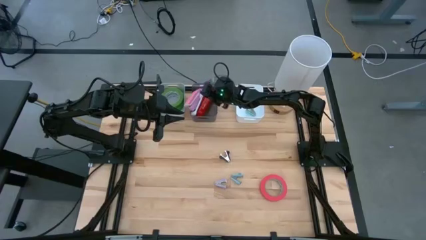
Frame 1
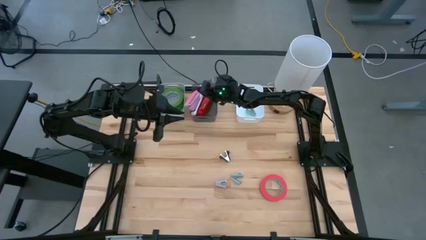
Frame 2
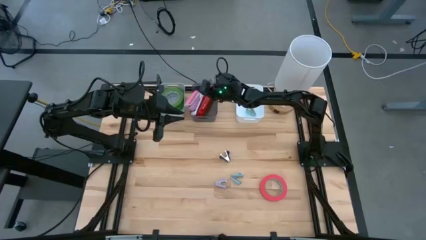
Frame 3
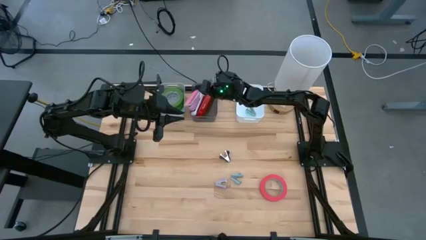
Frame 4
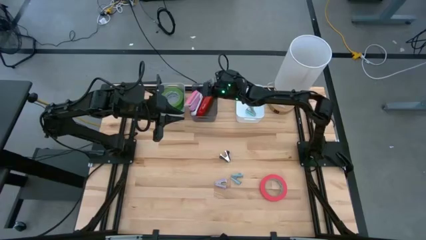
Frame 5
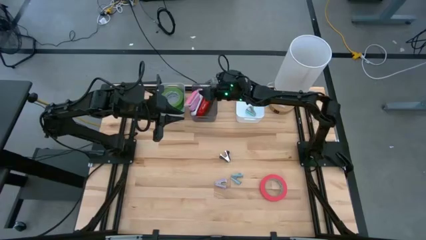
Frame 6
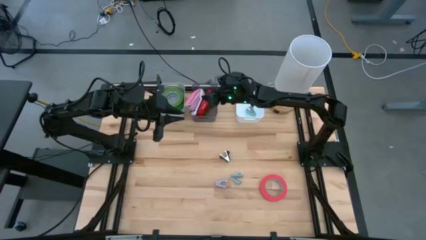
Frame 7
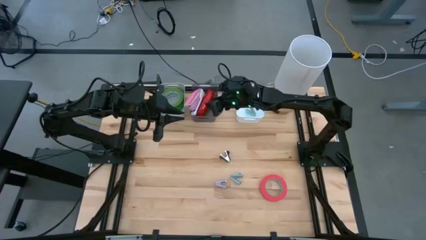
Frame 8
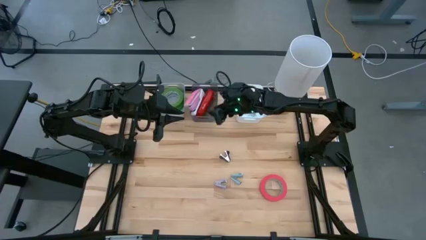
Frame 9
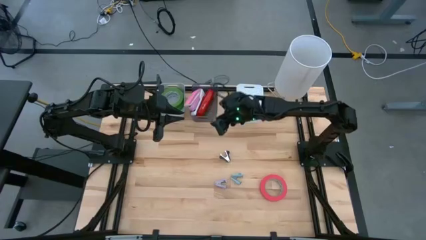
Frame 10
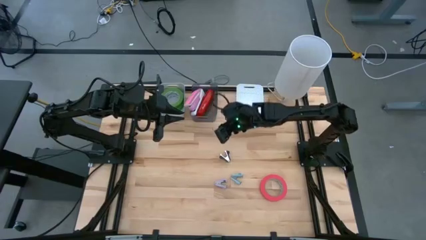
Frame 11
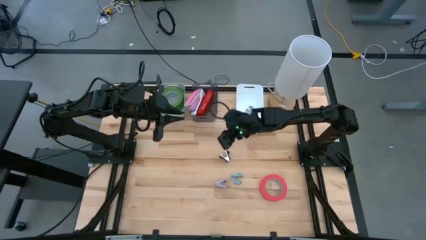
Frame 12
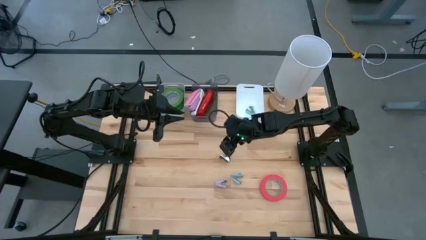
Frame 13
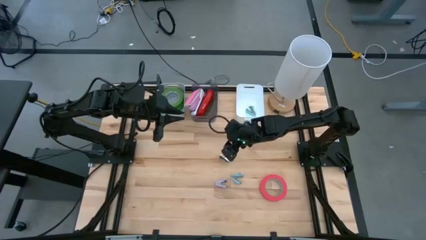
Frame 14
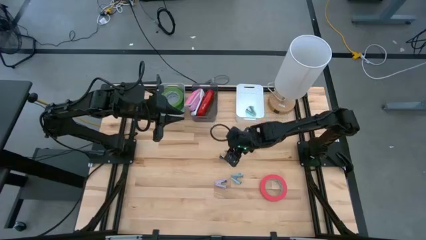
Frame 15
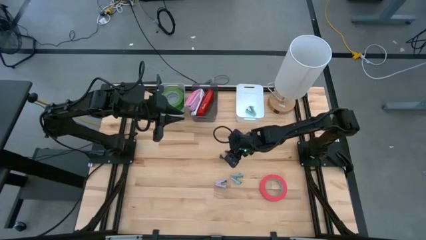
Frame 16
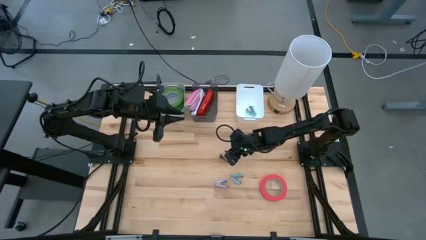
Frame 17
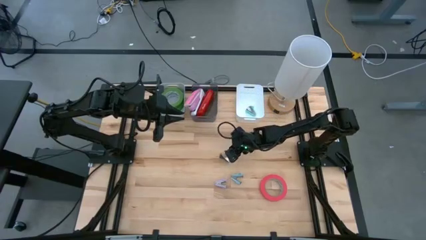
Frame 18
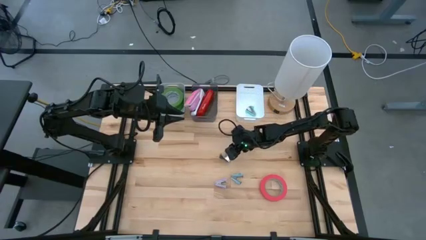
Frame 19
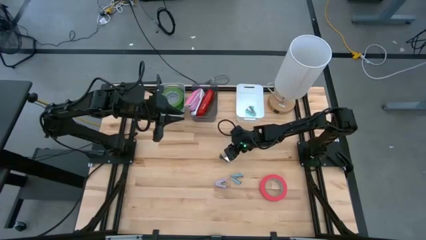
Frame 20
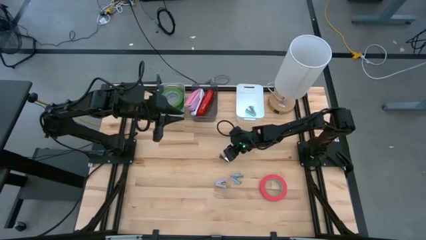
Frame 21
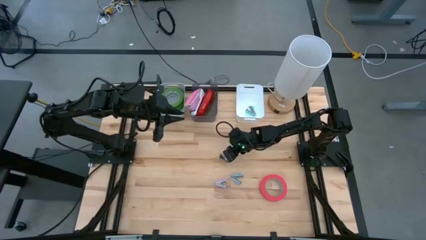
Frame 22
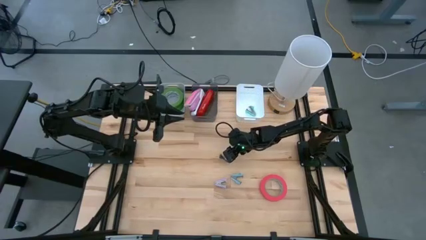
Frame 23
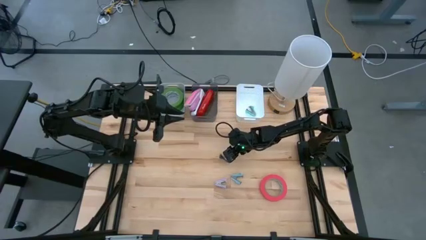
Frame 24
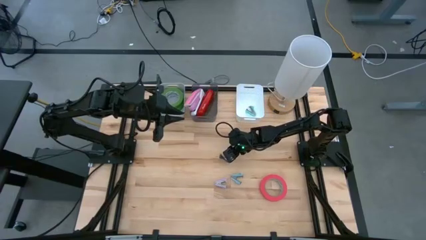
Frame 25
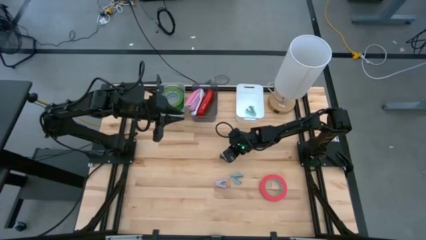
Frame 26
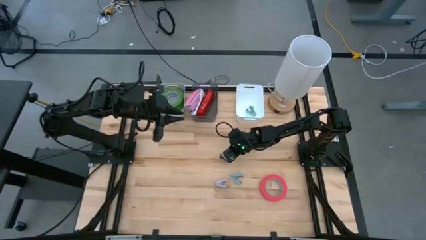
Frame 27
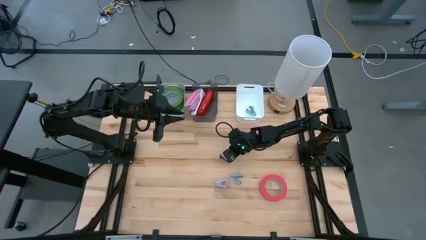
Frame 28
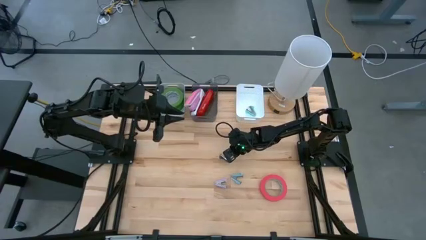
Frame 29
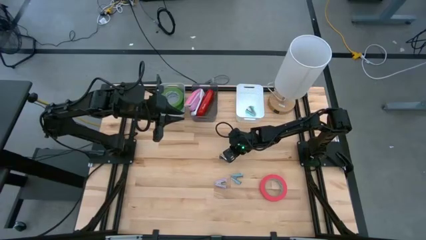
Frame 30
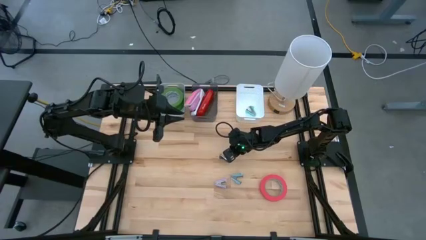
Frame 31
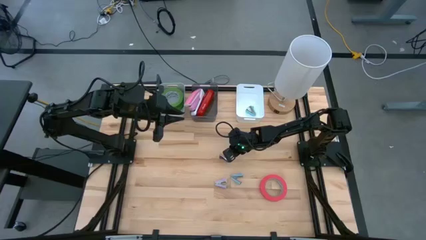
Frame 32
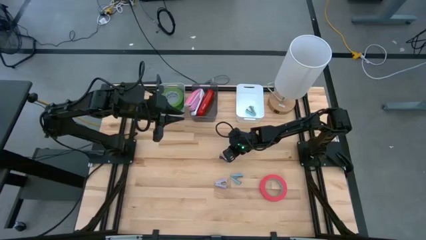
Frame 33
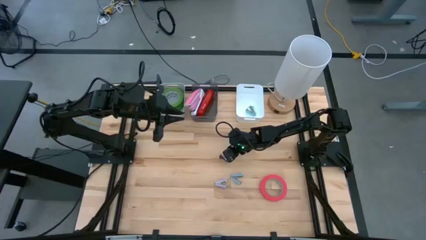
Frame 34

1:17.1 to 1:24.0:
Task: Pick and place Stapler, Stapler remover, tape
Put the black staple remover into the white bin

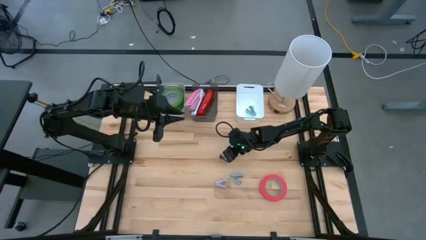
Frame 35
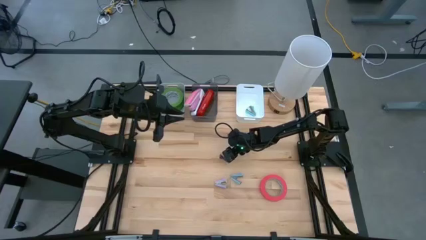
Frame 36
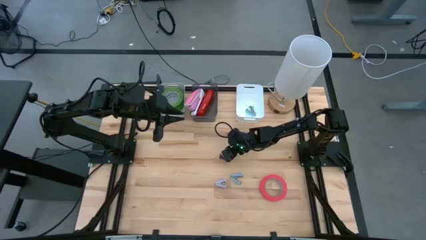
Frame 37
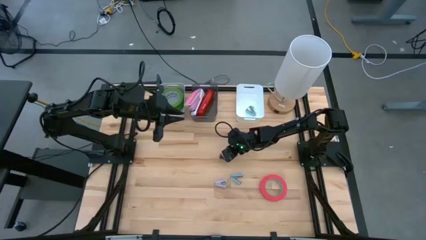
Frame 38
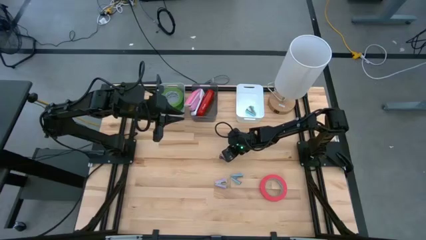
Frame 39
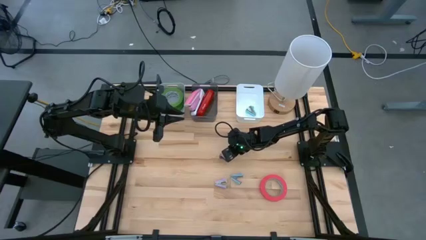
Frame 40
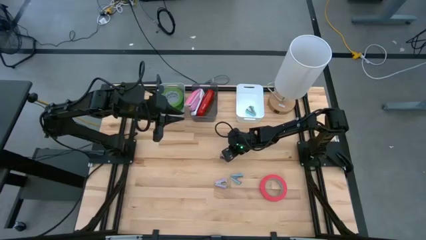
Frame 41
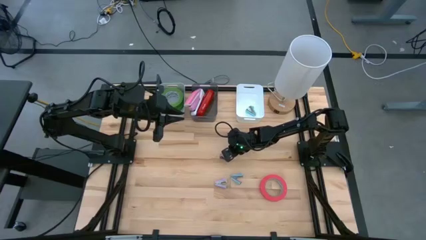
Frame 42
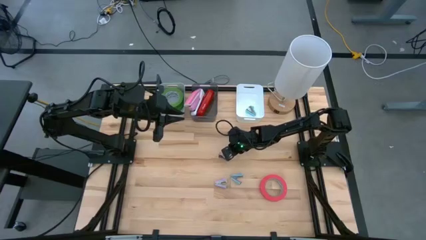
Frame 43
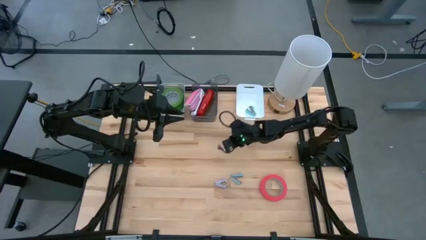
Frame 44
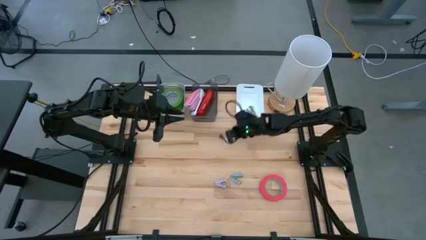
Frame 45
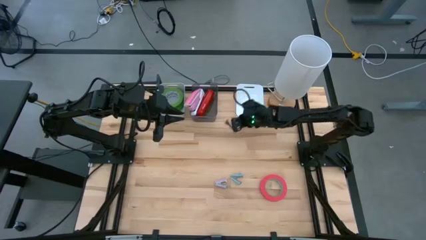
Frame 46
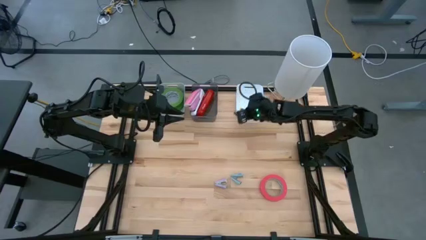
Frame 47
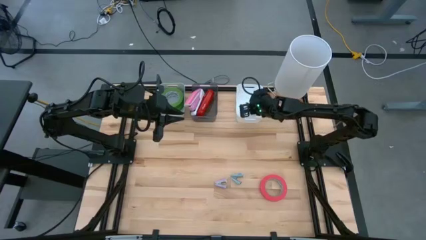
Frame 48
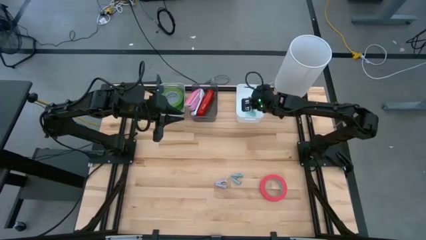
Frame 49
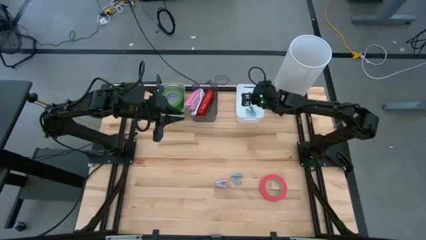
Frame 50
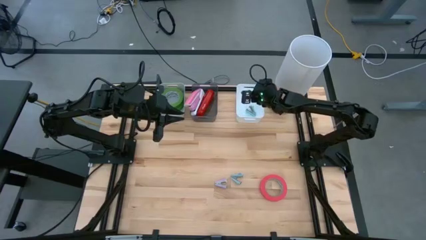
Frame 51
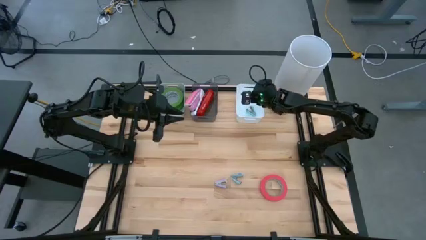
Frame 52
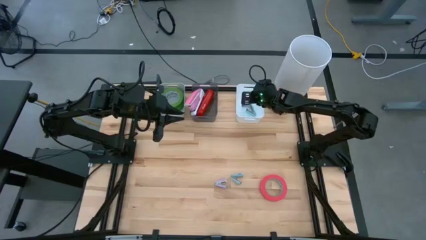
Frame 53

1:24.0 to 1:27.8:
Put the black staple remover into the white bin
